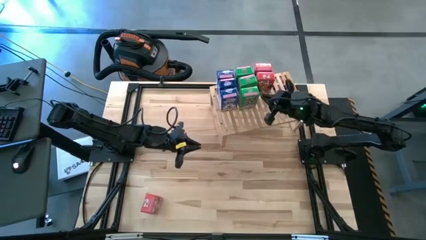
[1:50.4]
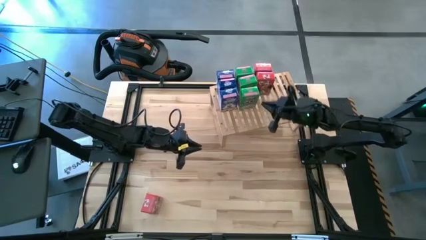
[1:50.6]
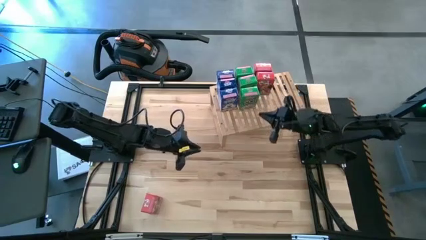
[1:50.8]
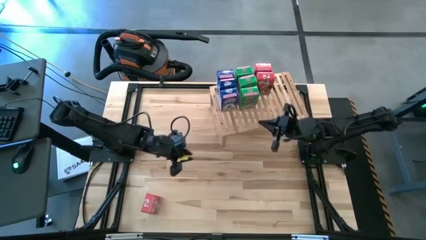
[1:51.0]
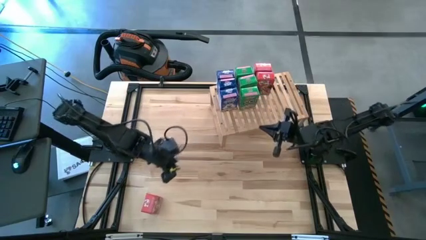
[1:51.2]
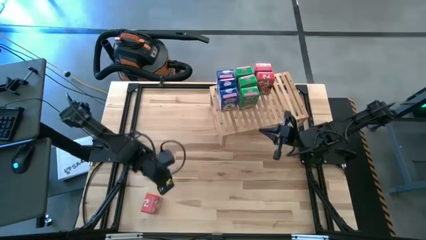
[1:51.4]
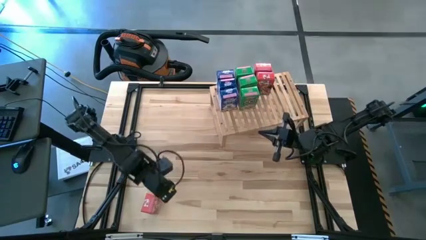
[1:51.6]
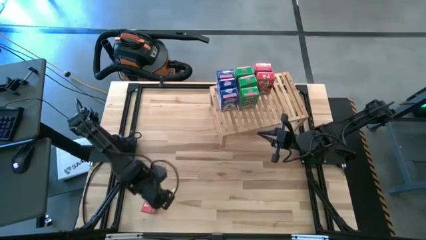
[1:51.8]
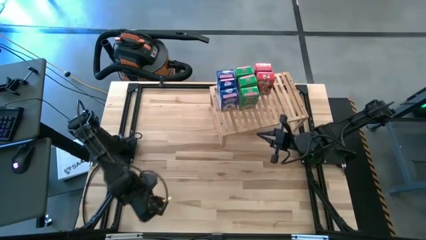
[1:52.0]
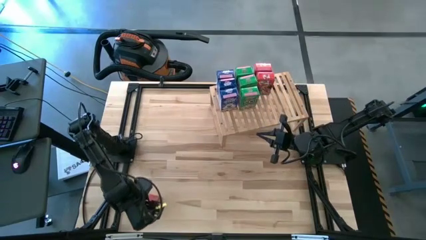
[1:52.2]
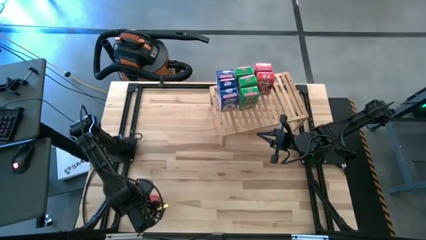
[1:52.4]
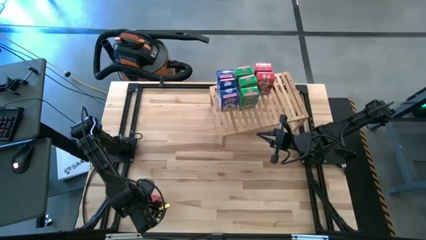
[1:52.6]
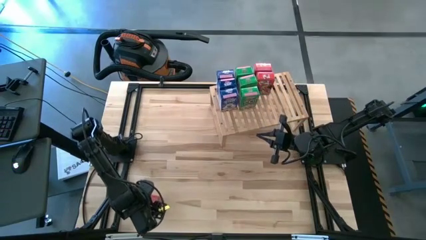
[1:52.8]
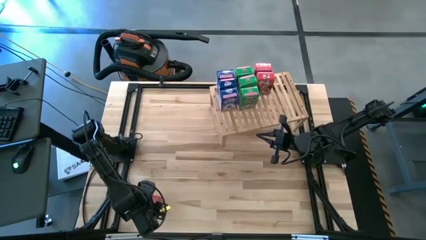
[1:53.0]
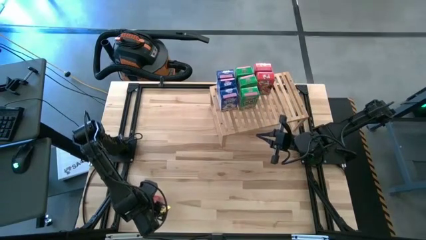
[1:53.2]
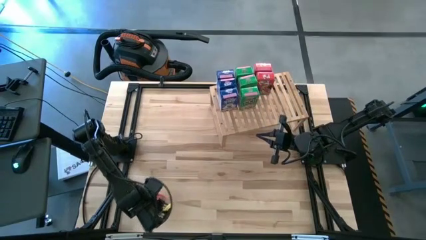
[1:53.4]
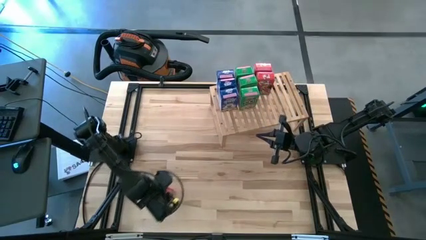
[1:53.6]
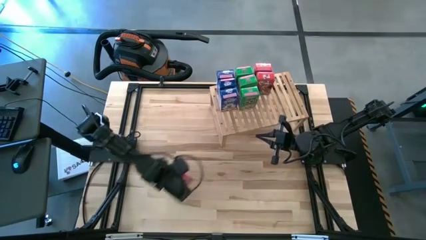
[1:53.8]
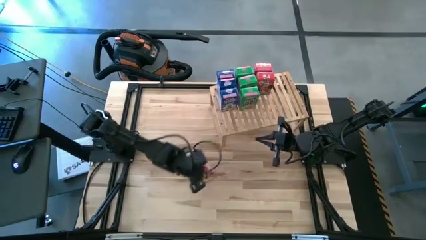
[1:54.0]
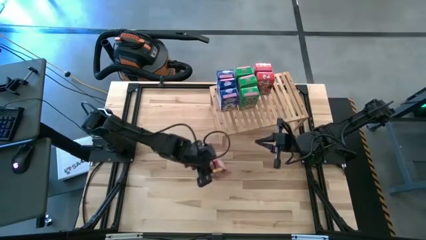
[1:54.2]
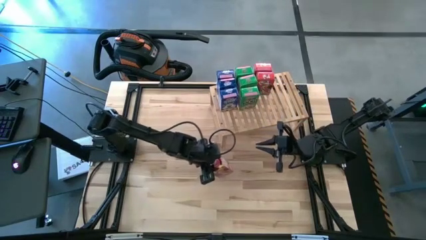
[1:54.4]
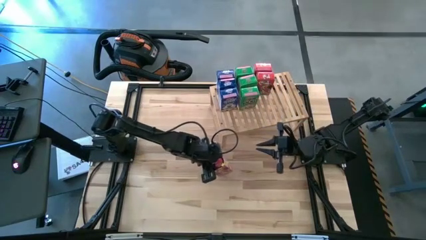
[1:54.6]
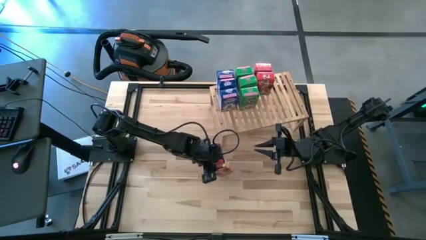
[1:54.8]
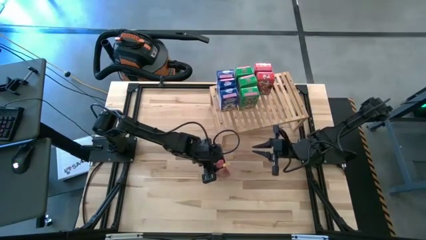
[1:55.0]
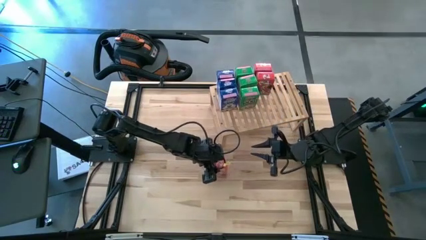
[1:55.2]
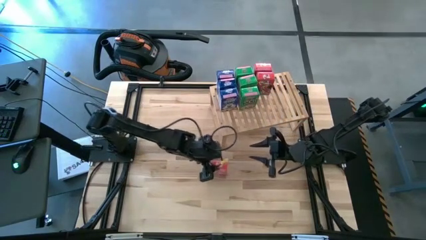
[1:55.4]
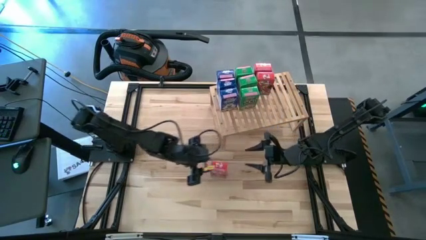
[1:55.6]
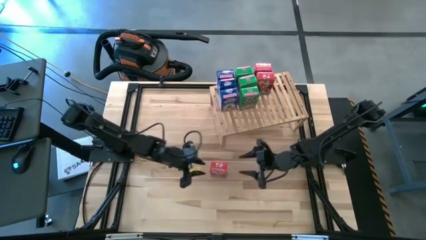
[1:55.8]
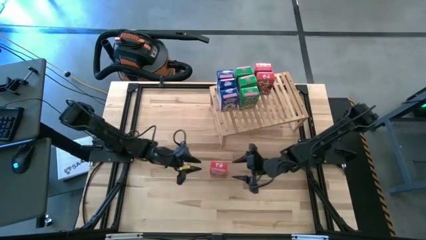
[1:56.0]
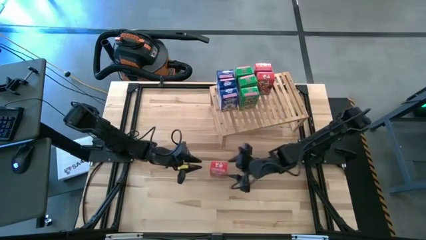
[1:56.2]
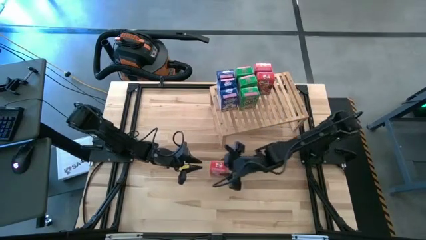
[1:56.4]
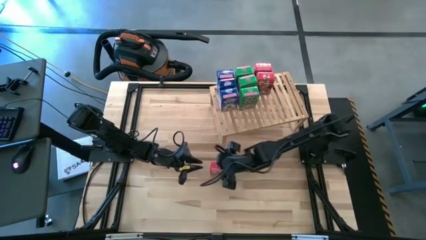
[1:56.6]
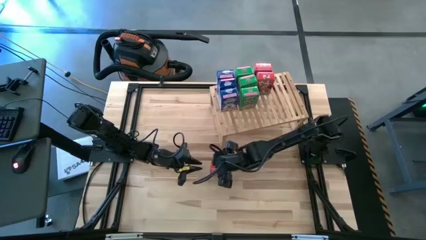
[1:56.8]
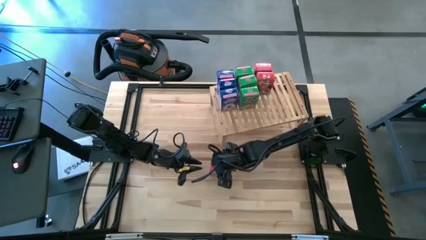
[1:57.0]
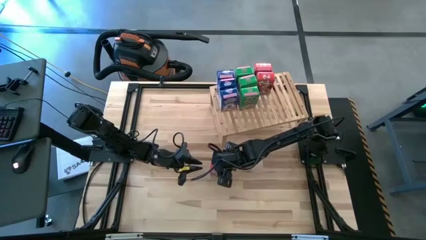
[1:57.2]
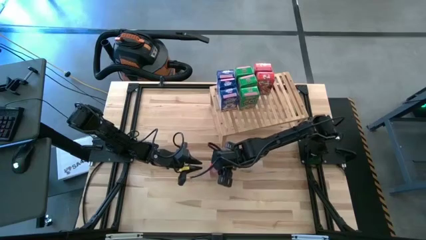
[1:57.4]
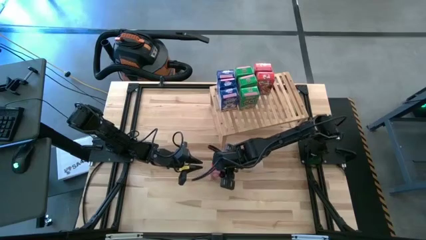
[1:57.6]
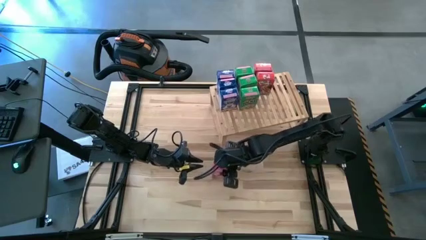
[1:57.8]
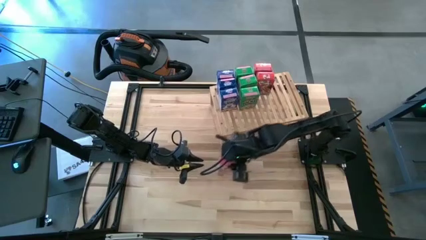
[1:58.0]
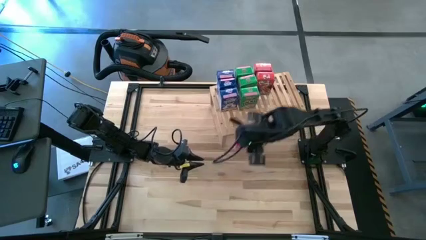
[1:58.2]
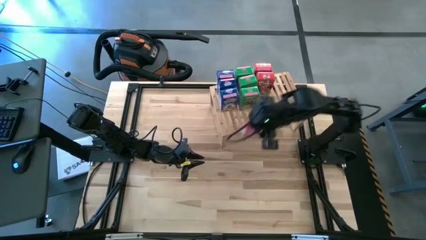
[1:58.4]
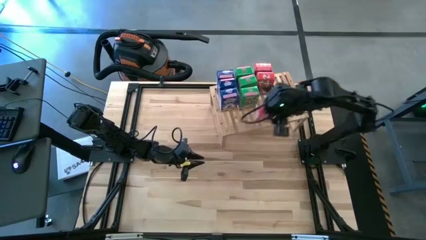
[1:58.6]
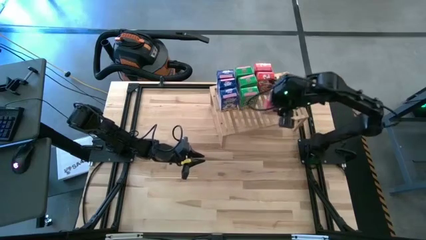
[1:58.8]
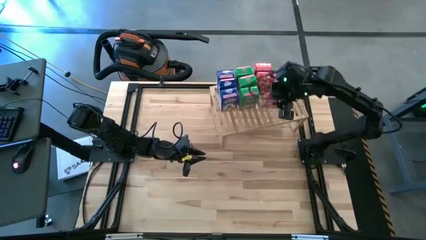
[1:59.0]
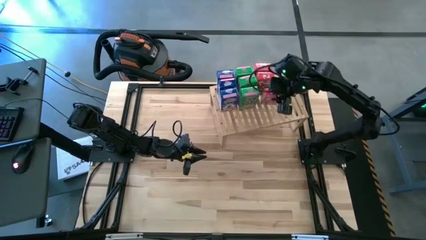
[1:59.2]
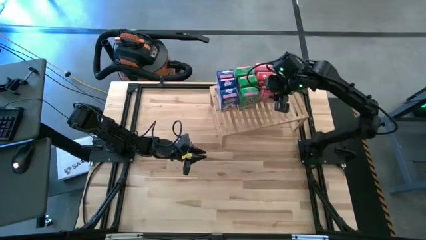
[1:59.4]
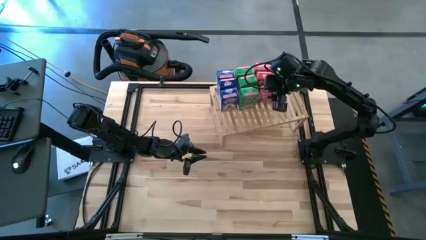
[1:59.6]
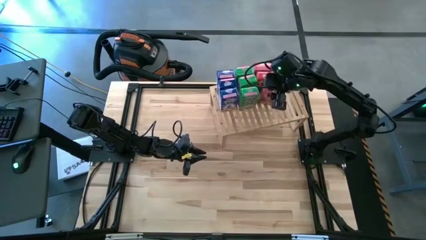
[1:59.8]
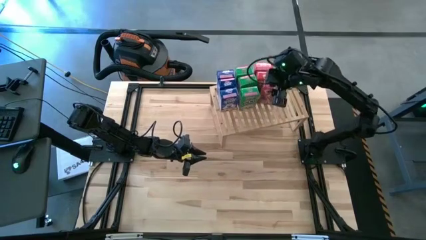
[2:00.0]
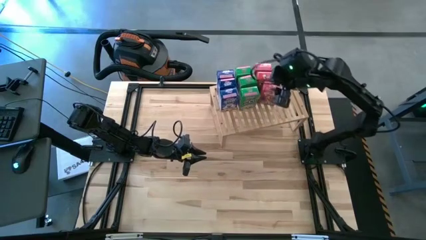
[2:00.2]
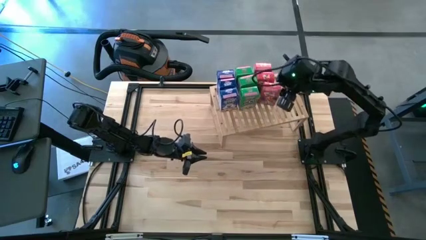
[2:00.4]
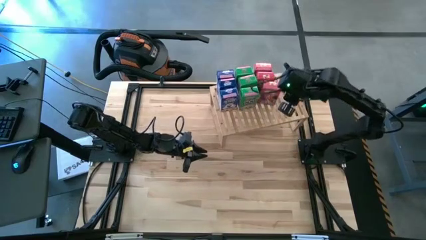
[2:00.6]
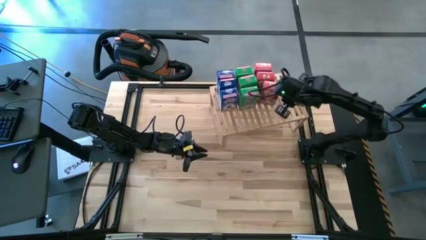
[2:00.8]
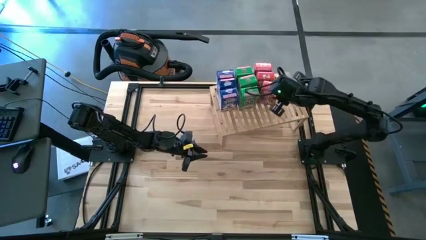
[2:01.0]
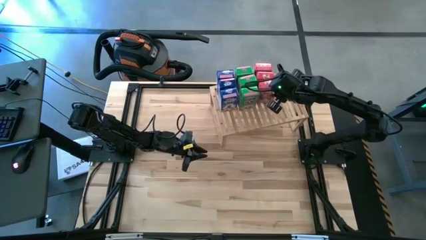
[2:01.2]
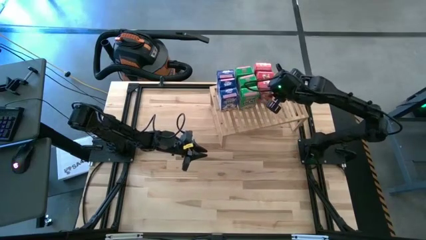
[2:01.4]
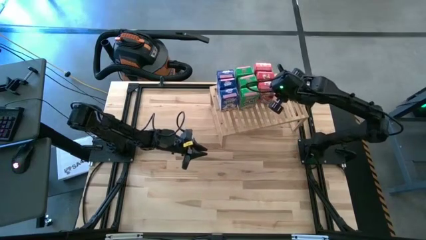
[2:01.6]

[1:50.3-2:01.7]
Task: Stack cereal on shelf
Put the red cereal box on the shelf aligned with the other red cereal boxes

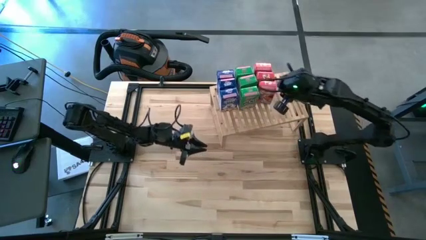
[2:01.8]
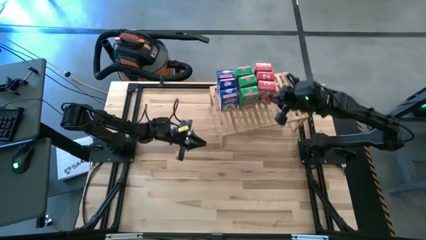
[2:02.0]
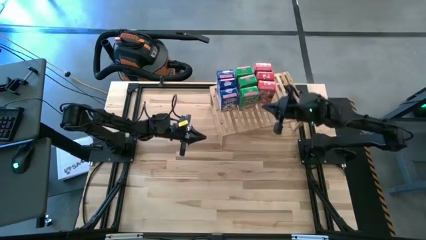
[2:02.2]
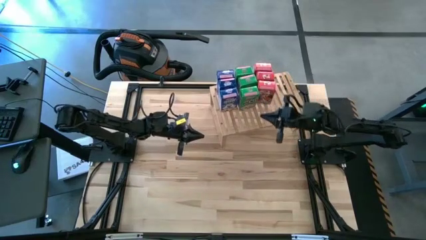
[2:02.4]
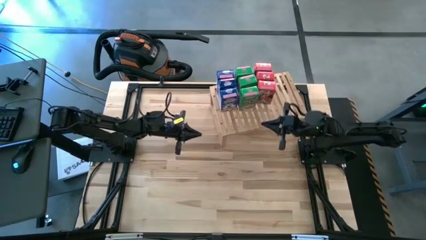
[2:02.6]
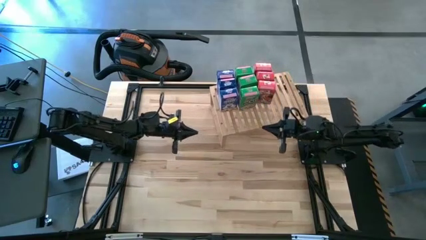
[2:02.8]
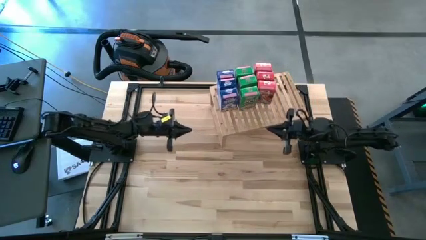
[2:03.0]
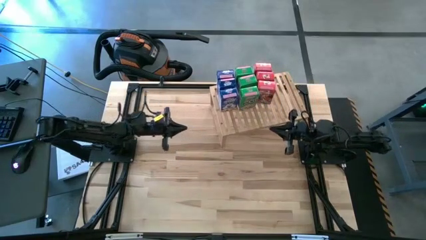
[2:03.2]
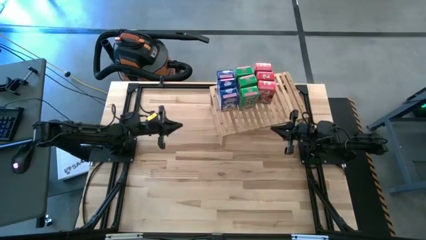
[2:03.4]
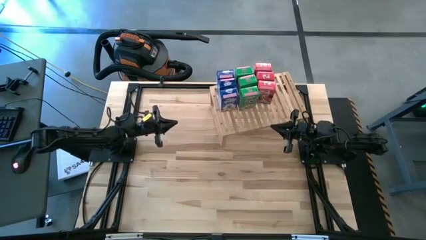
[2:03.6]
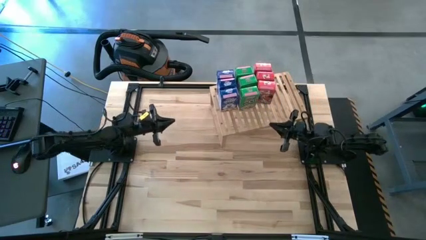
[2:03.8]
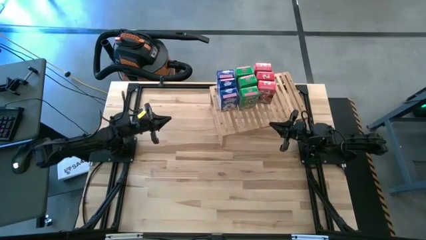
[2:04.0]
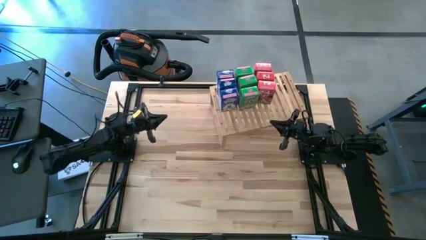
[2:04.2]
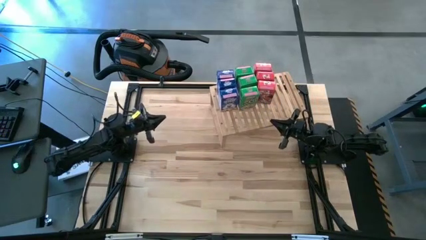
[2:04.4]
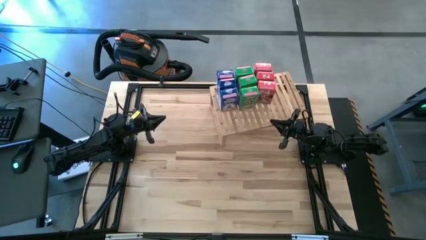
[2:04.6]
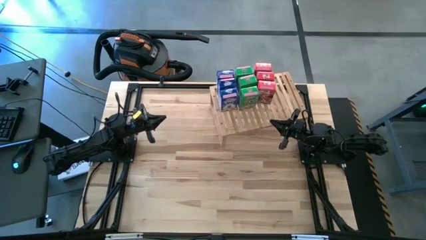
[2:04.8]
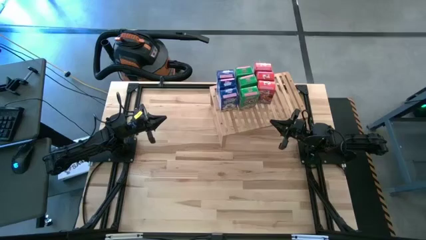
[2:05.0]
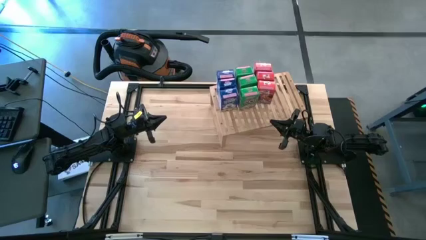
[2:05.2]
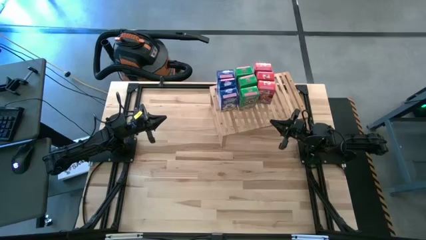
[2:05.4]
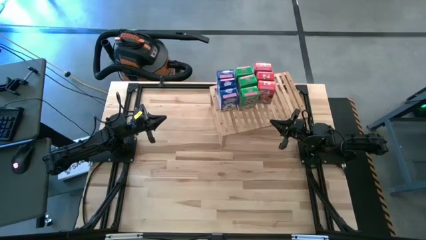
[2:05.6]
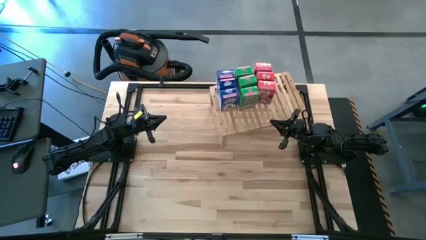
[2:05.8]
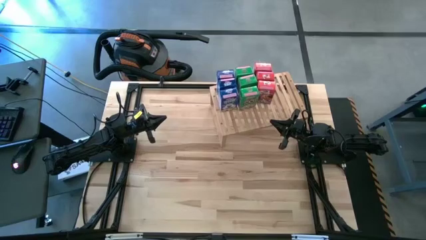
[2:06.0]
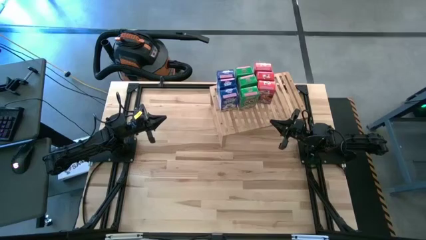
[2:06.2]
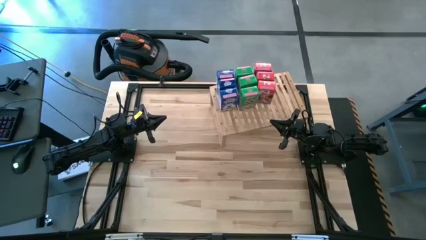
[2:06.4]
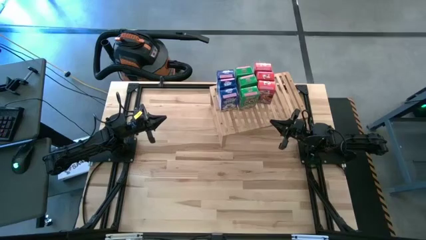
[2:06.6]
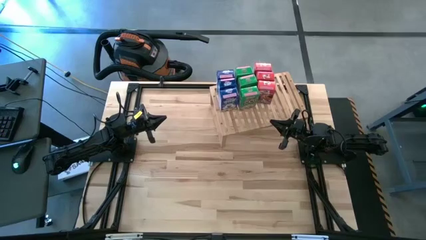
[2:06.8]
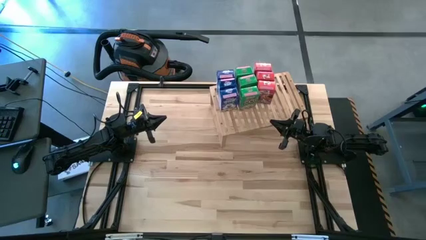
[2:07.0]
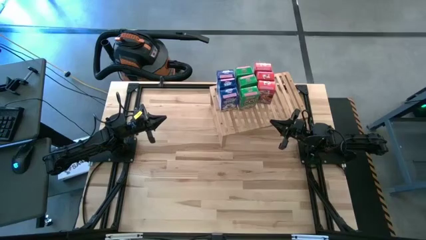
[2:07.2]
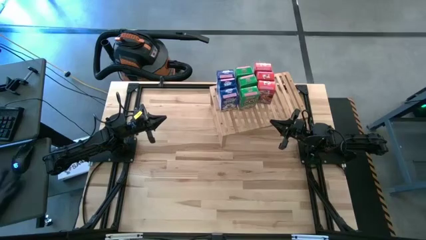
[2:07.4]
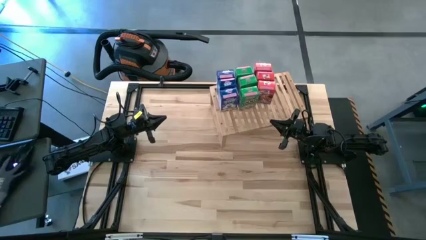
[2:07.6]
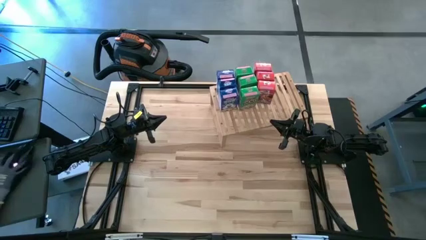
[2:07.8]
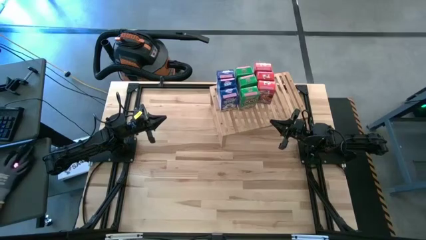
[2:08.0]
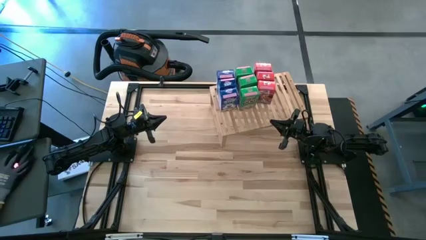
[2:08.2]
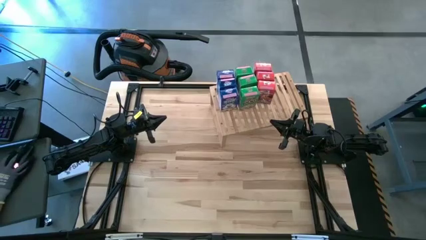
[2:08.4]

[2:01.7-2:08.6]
Return to Home Position
